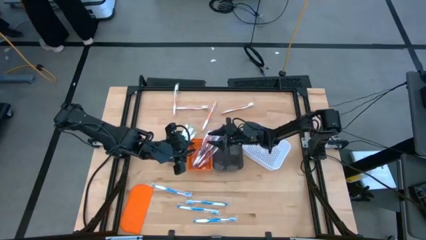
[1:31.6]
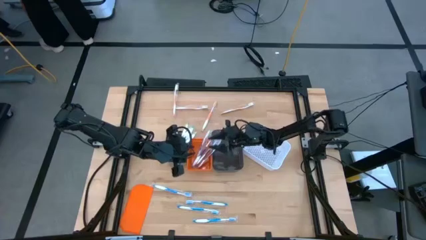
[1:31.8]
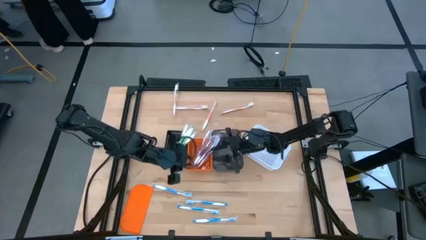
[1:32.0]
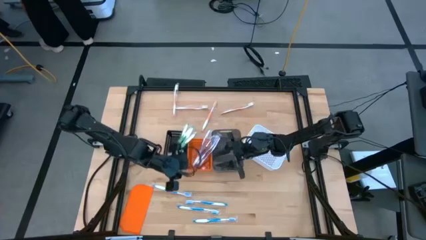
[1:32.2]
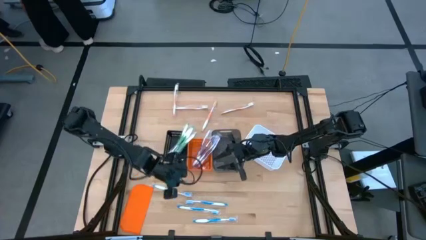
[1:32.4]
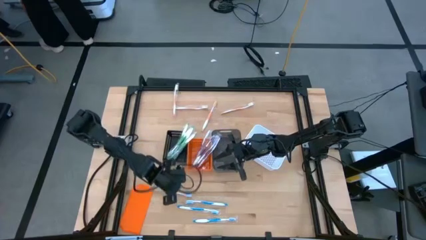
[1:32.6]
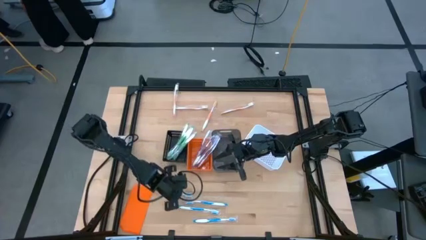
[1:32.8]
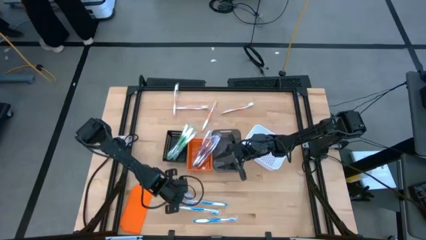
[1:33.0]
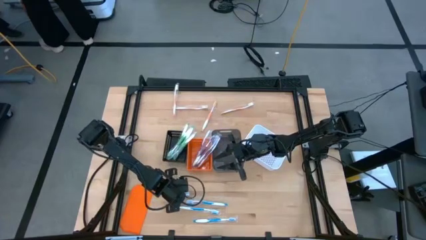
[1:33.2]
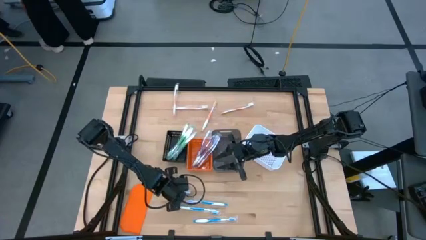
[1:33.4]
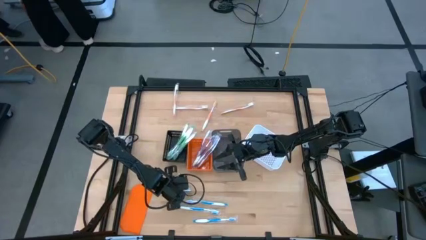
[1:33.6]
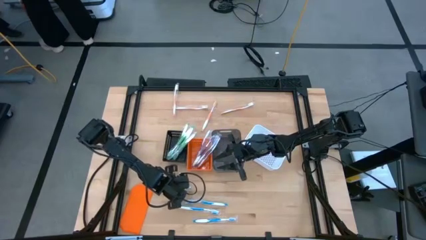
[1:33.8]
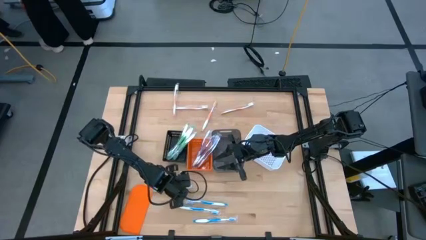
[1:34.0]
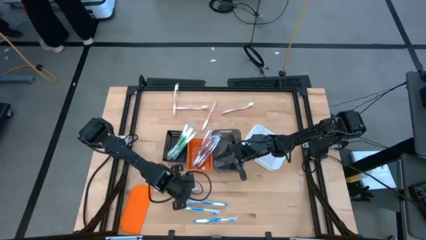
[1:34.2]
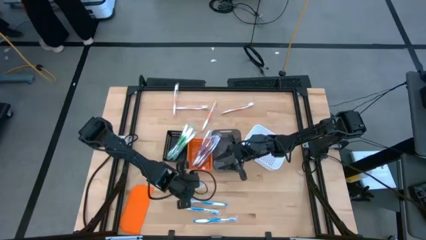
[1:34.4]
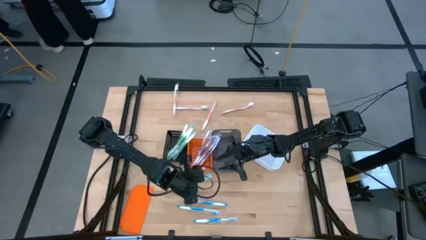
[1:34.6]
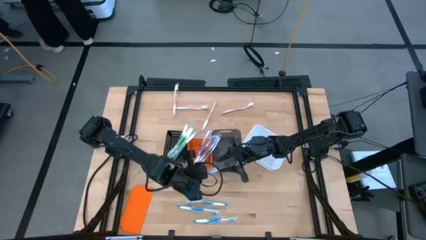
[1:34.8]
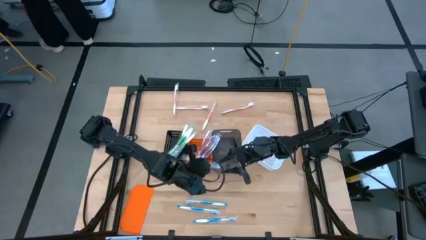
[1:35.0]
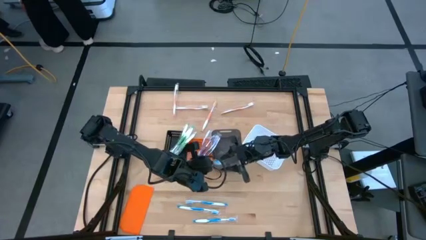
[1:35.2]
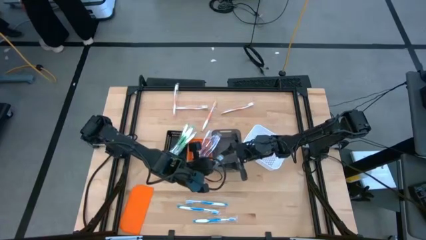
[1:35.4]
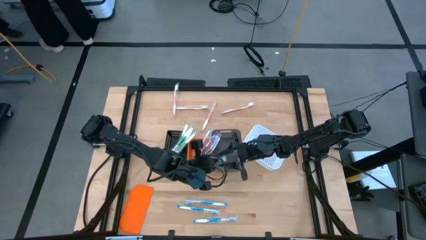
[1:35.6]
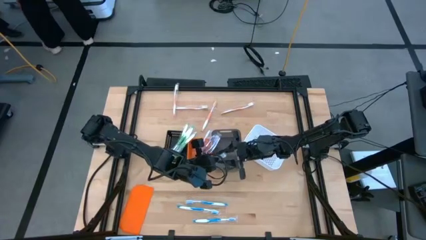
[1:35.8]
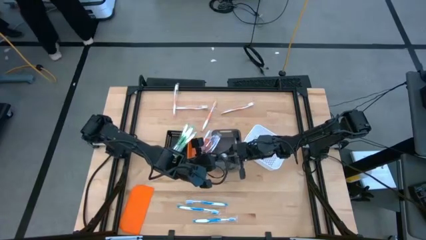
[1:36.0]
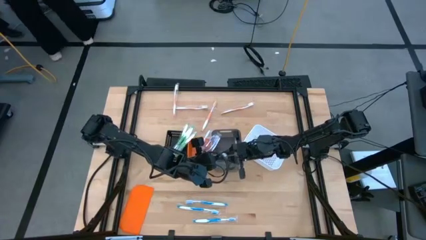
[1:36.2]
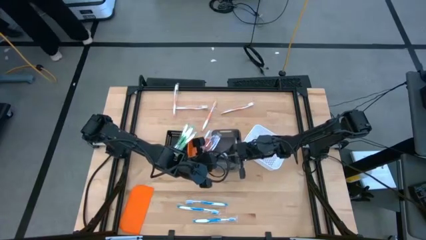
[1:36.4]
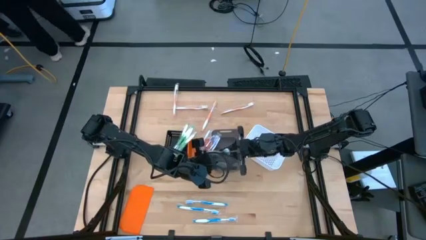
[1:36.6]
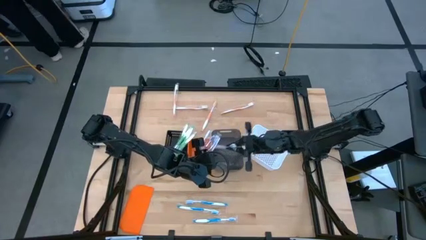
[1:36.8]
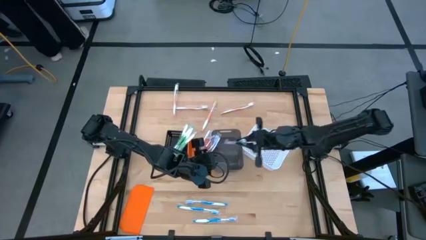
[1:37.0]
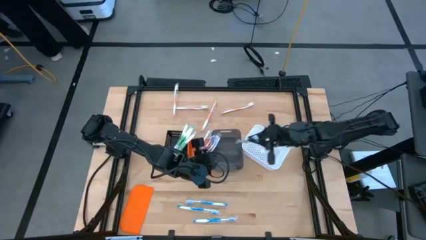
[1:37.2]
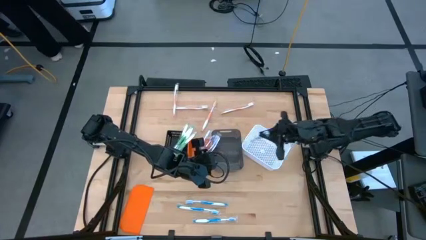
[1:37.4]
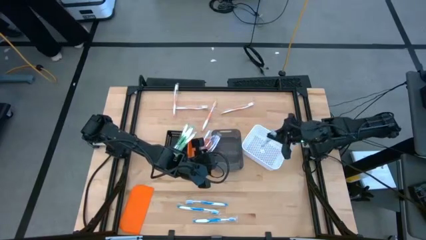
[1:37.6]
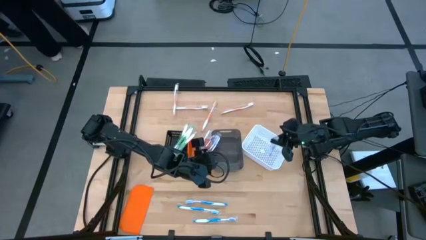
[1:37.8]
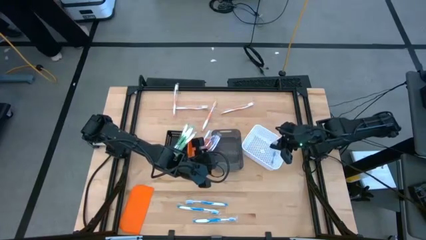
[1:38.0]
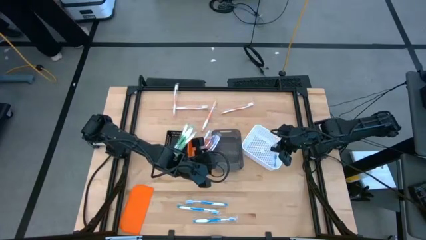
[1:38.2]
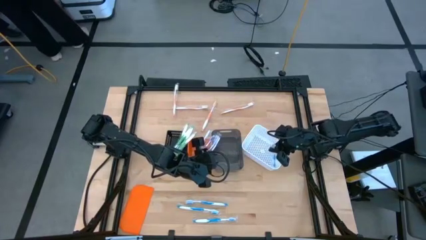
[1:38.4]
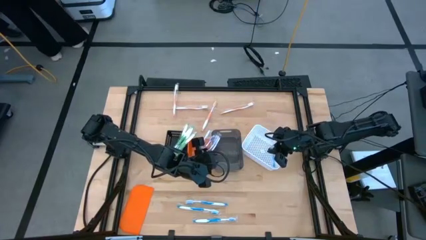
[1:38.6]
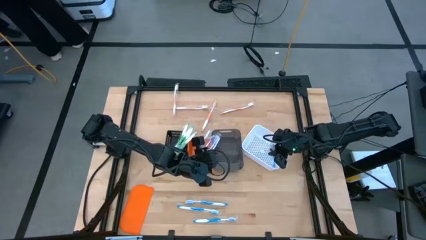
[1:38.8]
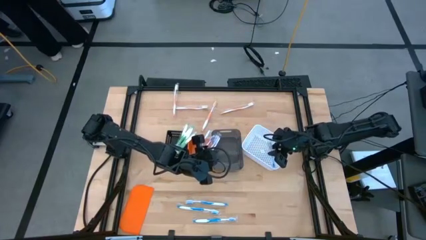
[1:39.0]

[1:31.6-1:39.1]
Task: Pick & Place Toothbrushes
Put the blue toothbrush into the white bin

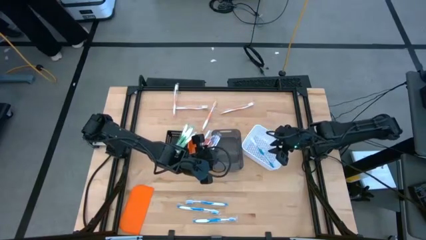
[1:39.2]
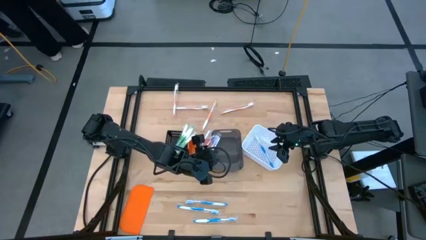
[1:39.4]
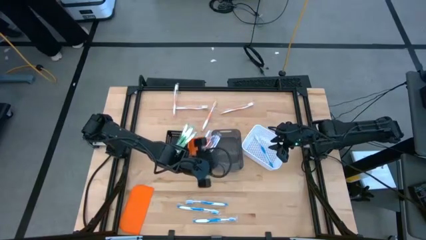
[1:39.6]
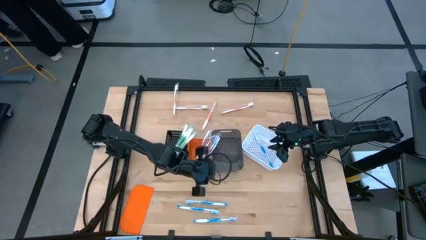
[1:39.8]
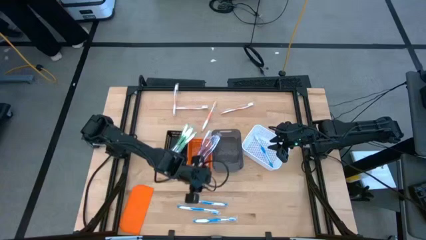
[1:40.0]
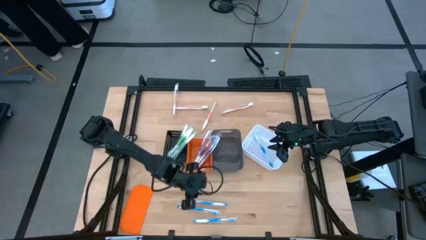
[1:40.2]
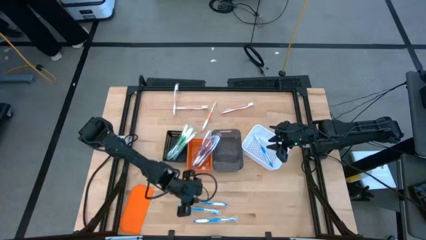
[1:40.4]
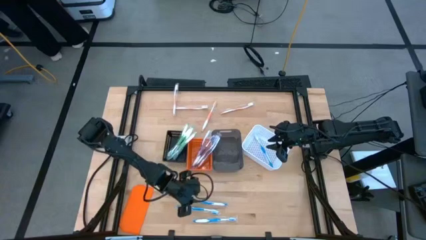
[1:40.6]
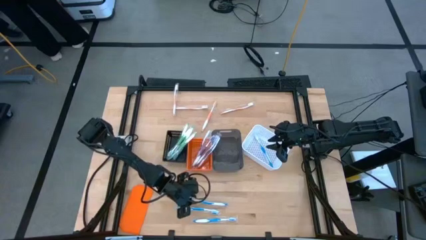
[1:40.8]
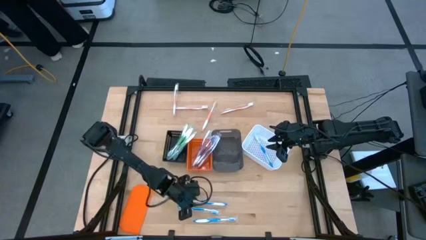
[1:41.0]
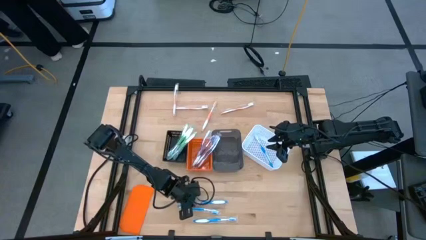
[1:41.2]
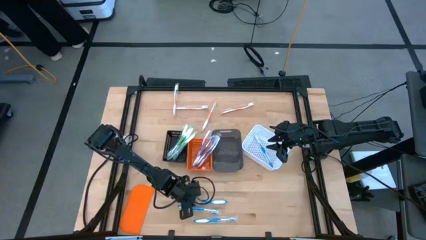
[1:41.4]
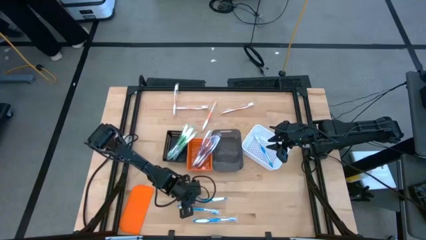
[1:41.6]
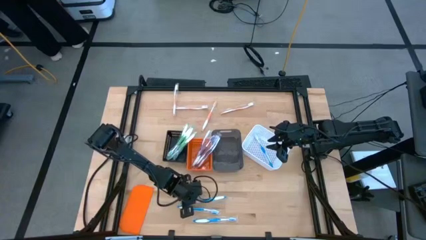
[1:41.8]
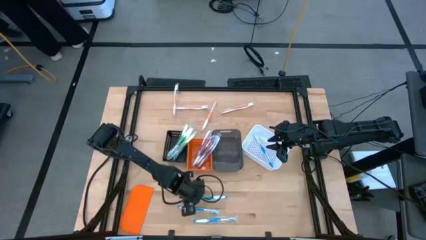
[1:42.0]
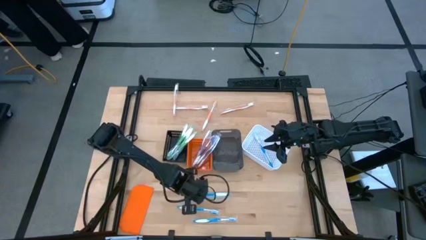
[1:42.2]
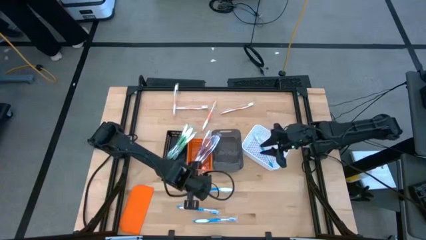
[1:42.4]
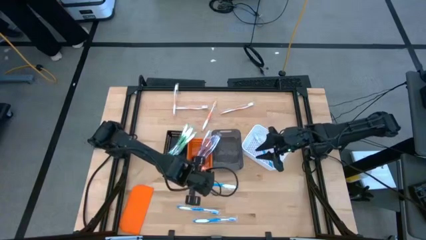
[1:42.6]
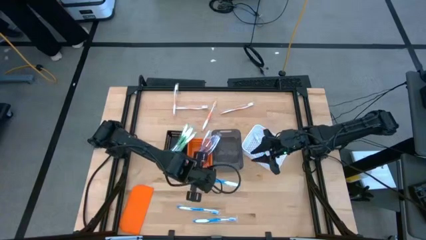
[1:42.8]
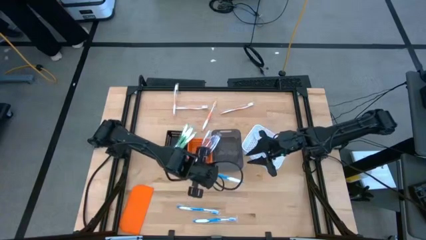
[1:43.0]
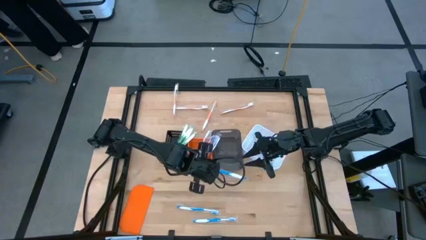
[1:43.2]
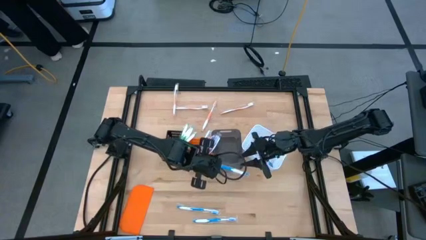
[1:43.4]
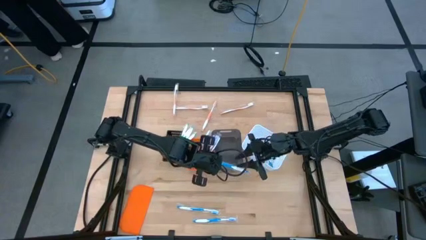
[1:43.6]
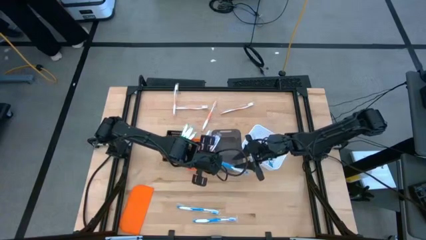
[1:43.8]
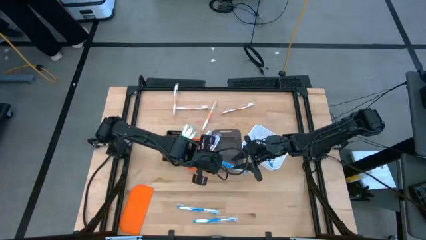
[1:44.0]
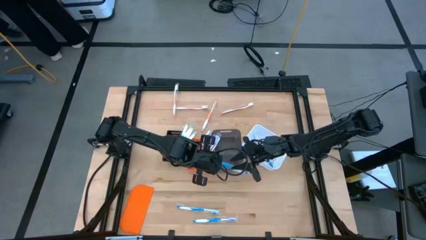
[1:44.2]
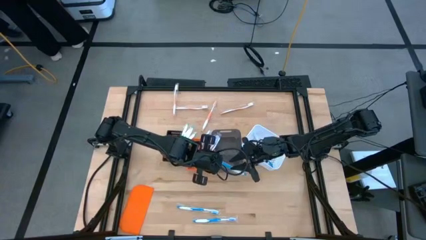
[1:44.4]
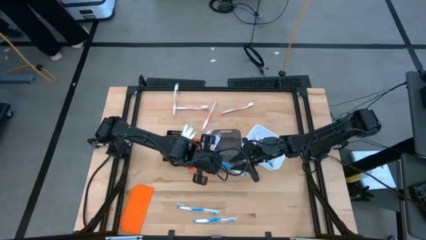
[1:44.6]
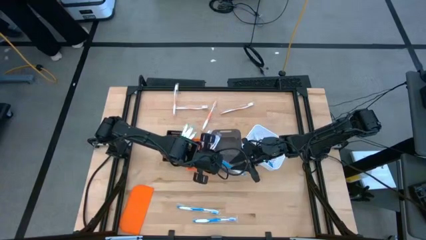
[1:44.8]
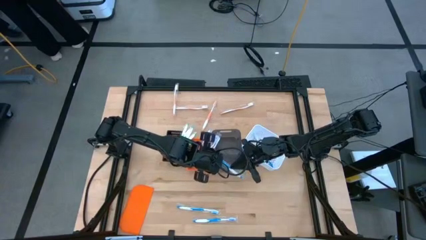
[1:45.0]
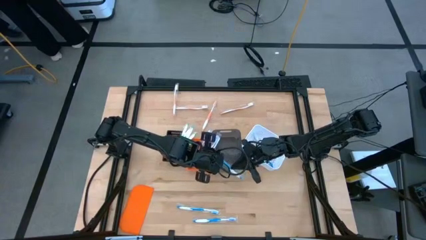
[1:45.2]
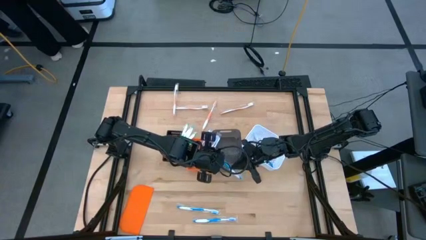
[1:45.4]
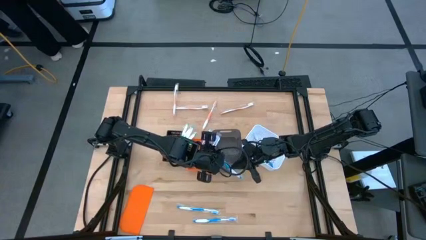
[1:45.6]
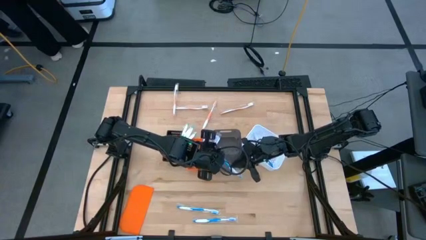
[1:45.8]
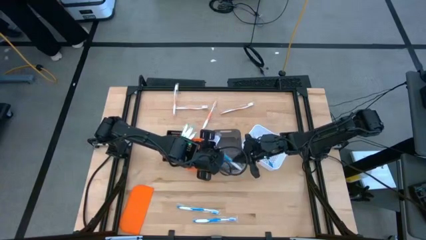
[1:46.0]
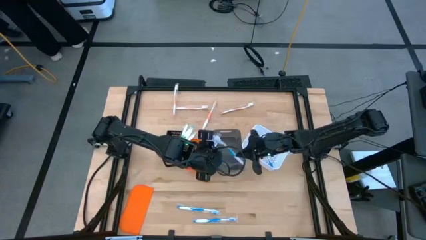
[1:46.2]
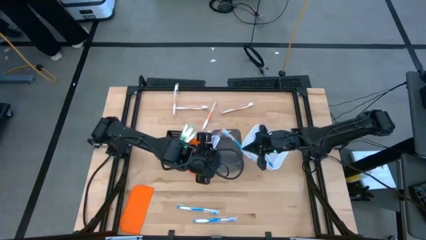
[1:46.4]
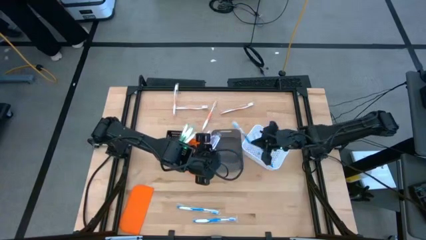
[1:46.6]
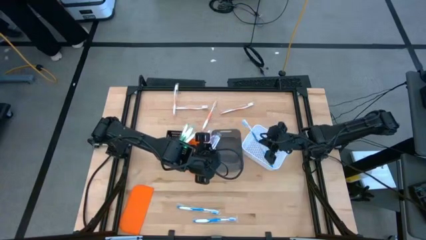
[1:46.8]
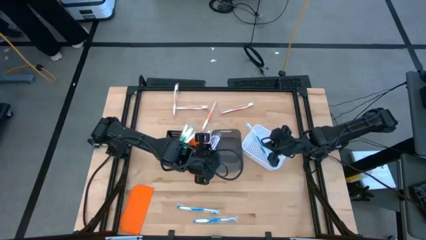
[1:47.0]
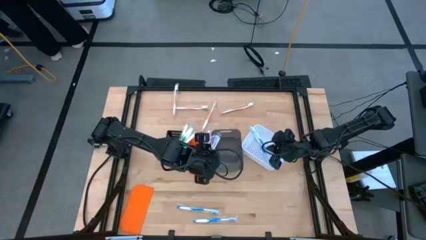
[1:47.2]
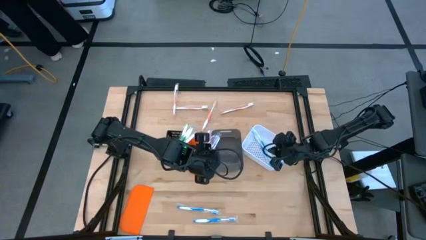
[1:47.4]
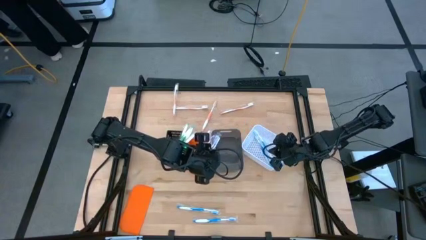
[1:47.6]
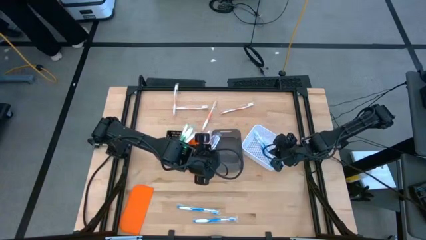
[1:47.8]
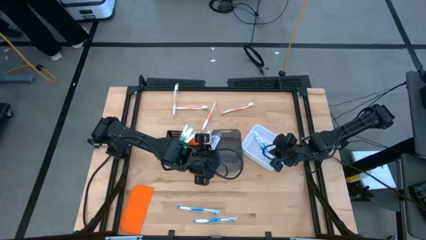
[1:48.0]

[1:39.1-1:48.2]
Put the blue toothbrush into the white bin

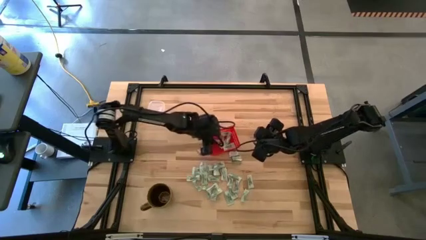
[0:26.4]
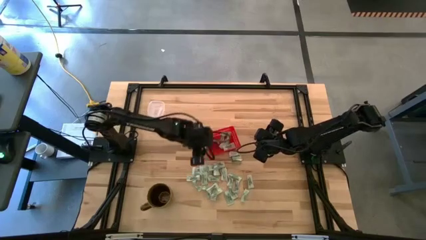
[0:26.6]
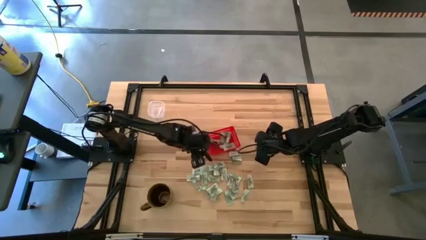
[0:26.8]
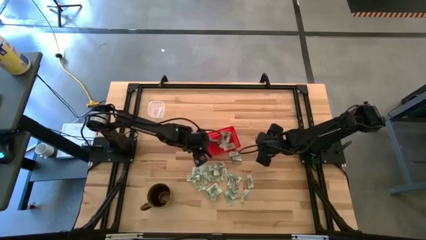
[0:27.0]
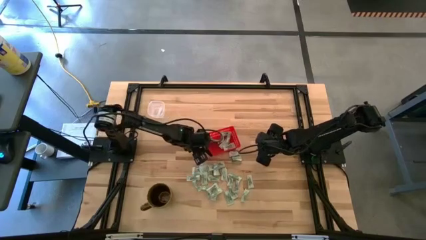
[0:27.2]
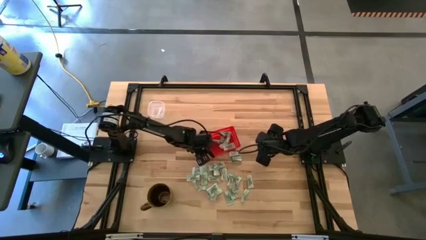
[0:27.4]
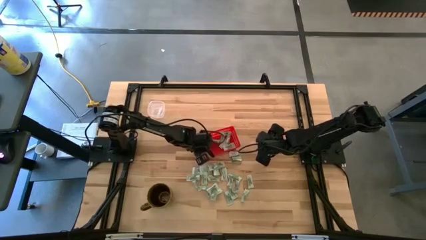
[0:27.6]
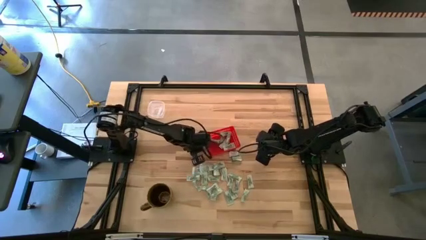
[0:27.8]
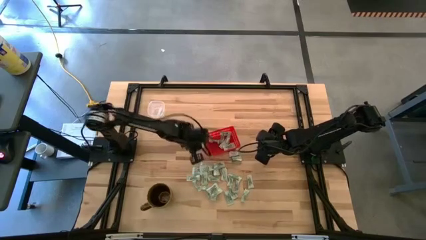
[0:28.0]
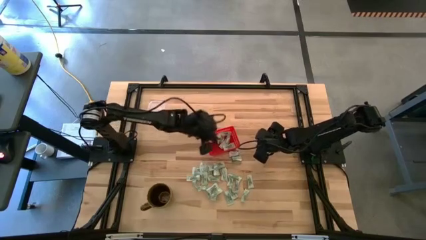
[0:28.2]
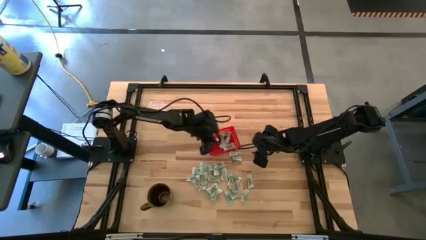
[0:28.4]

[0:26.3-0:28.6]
Task: Pick and place items into bin
Put the white truvia packet into the red bin
